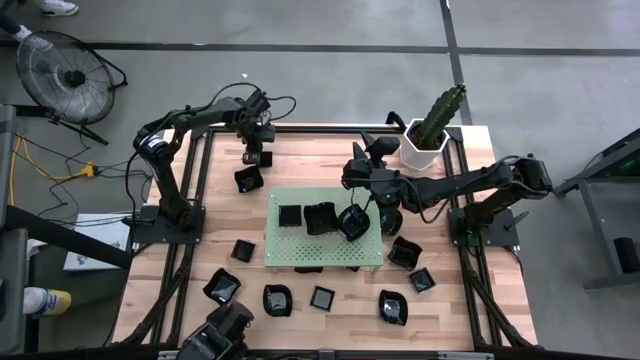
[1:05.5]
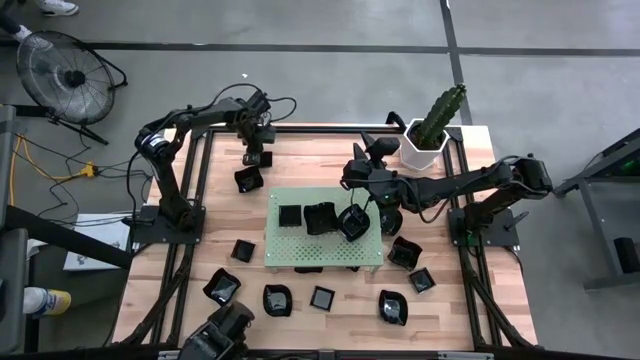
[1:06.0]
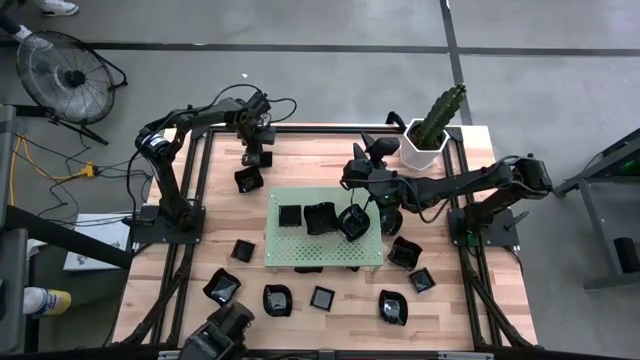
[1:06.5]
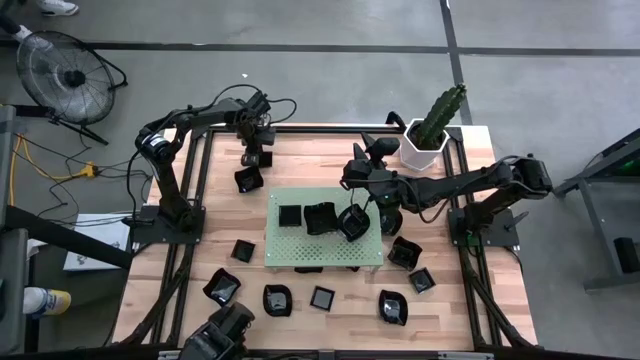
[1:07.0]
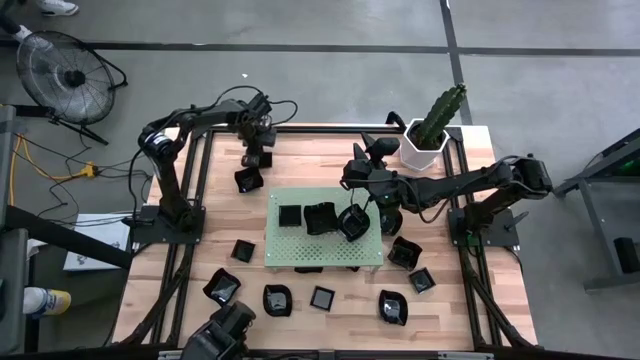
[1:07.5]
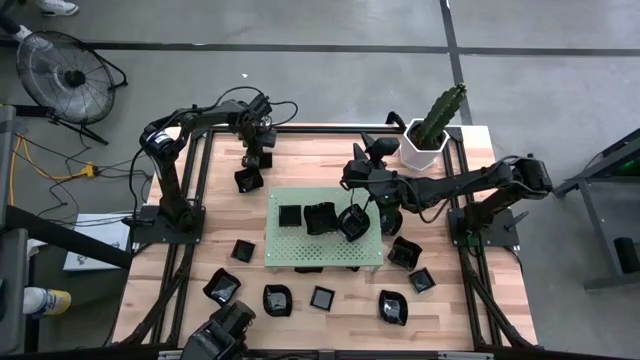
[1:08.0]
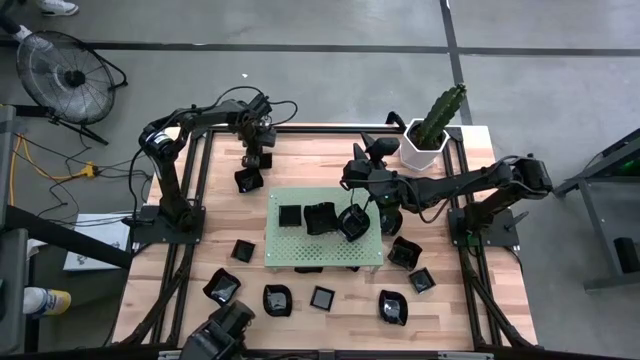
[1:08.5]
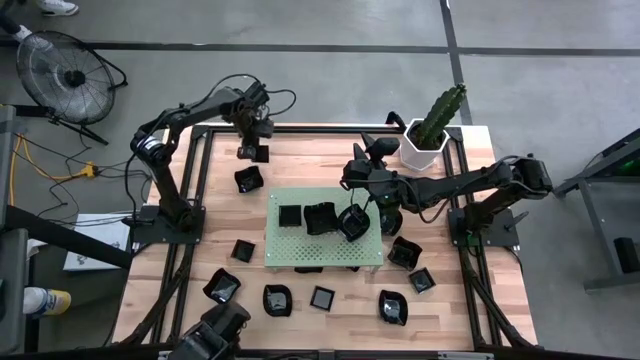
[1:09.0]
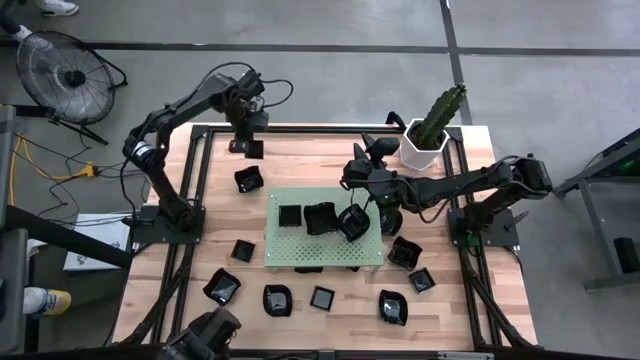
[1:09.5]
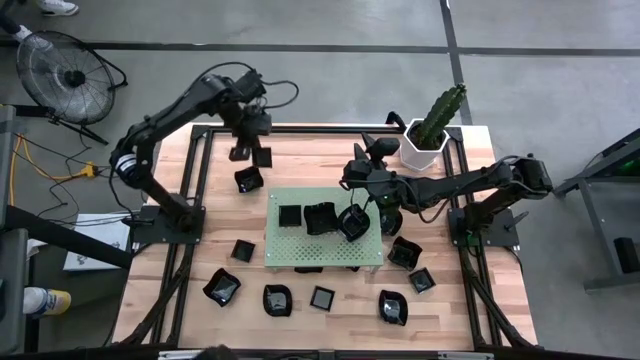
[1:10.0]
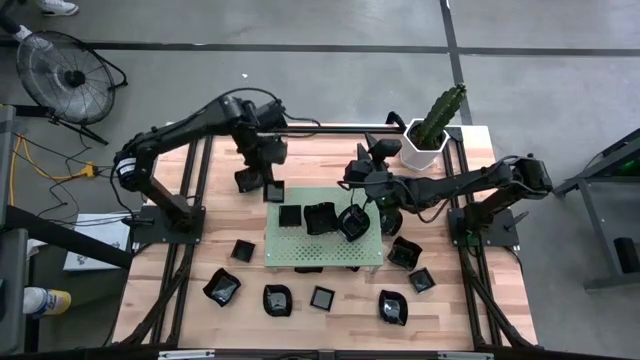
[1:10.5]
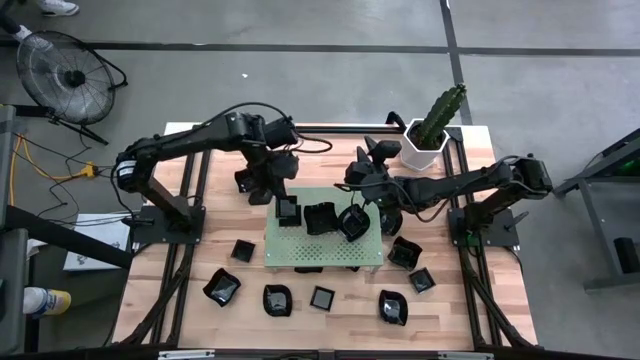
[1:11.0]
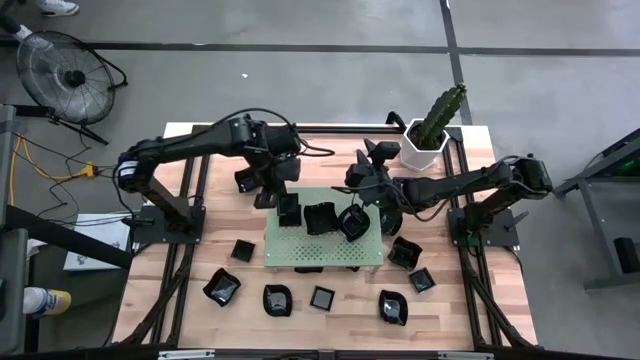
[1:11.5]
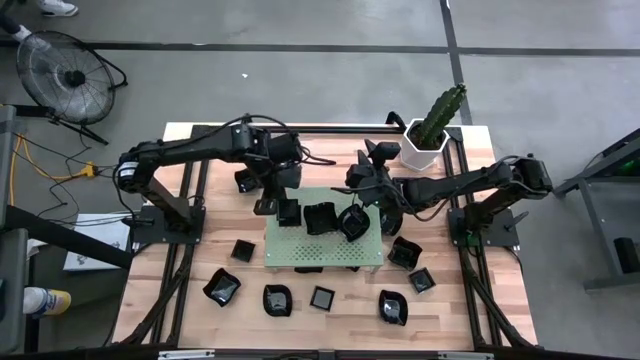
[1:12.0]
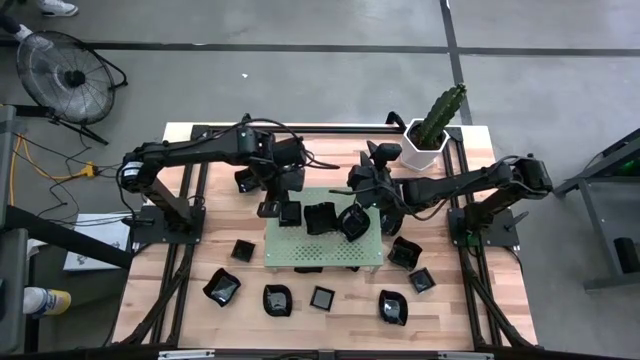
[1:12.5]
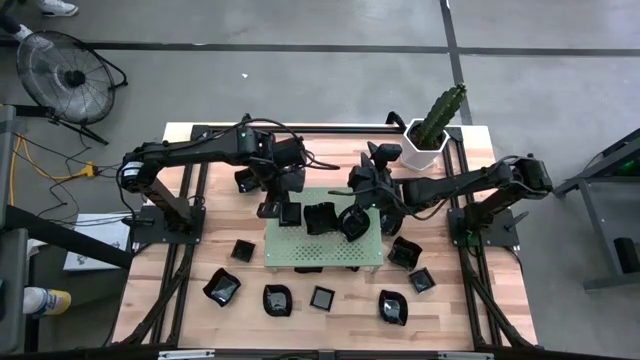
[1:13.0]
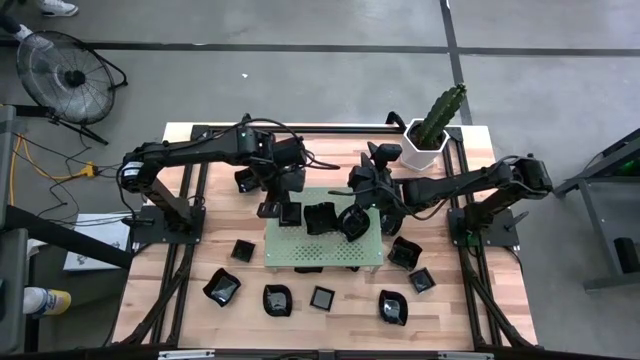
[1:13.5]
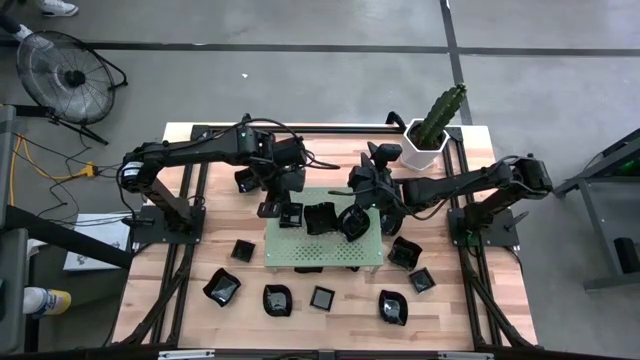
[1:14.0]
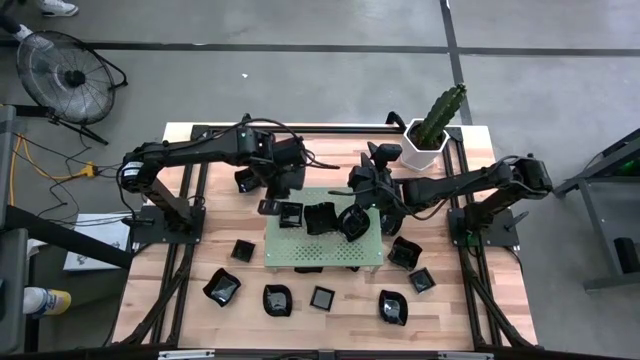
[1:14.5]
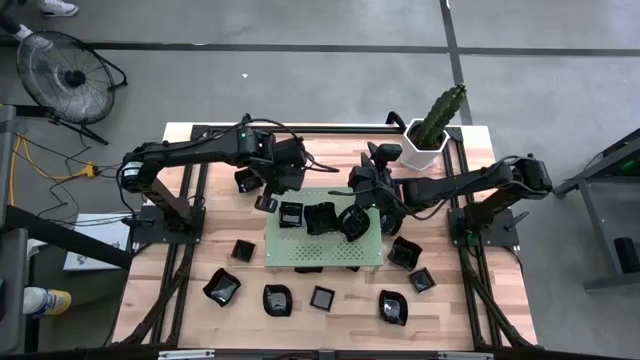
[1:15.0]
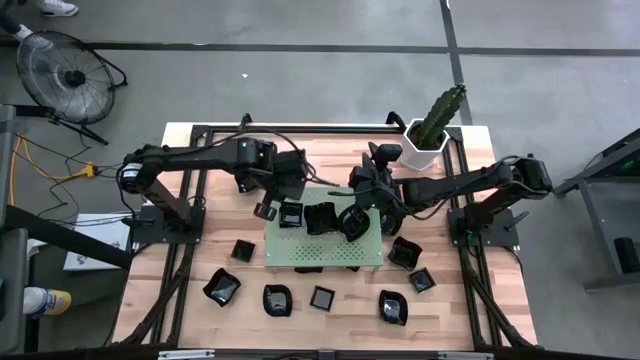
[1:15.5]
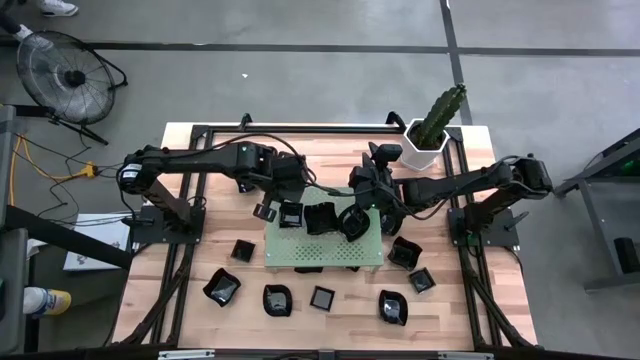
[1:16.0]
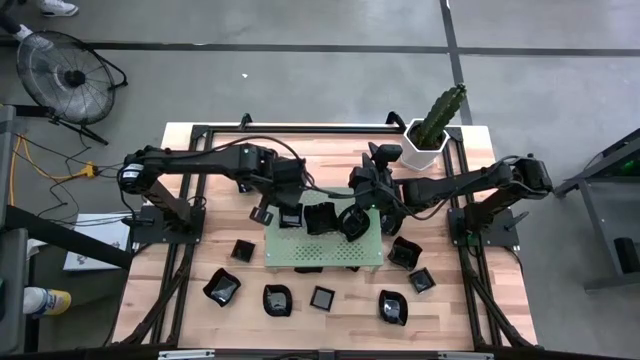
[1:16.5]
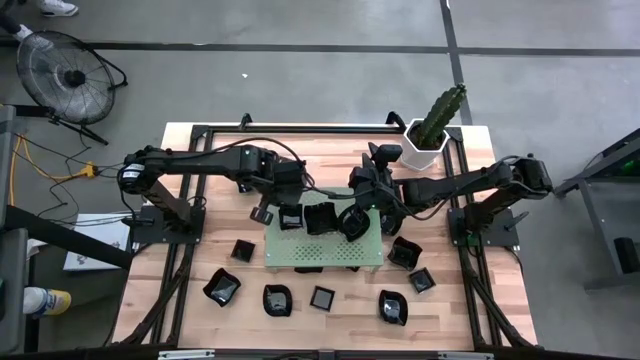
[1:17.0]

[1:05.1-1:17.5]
Task: Pick & Place Mini shaped plates
Stack the black square shaped plate on top of the black square shaped plate on the shelf

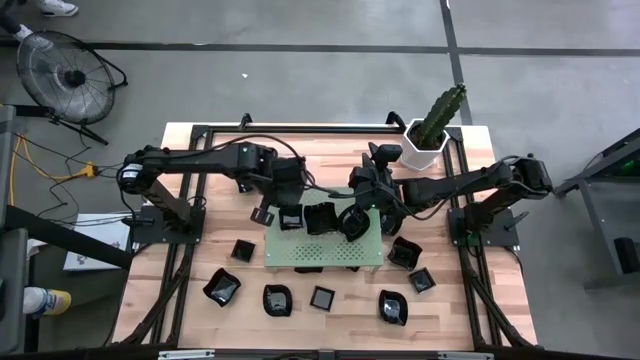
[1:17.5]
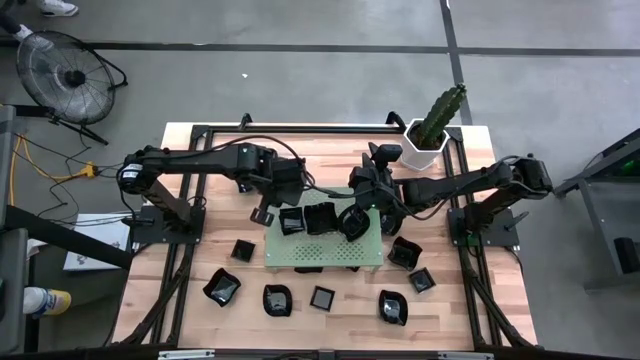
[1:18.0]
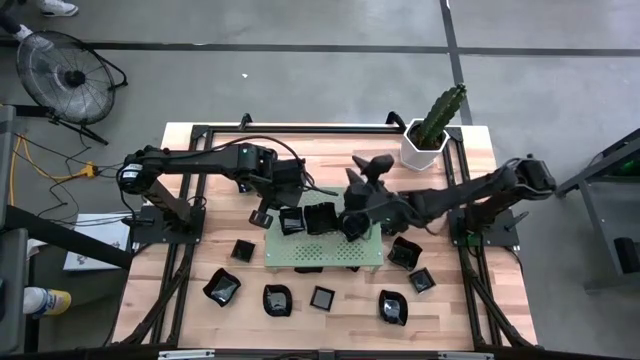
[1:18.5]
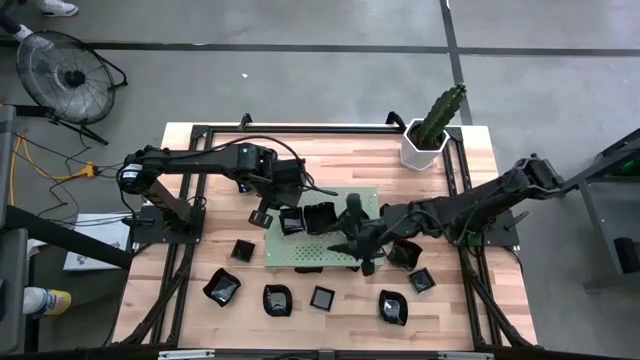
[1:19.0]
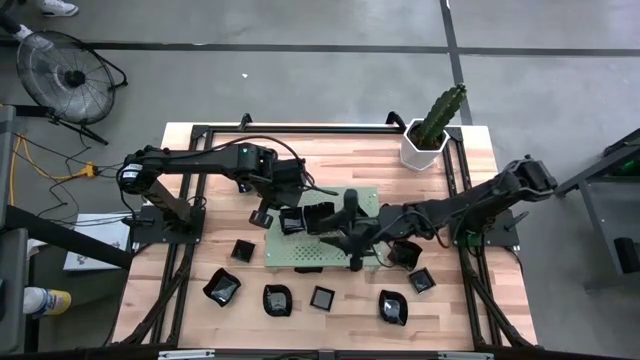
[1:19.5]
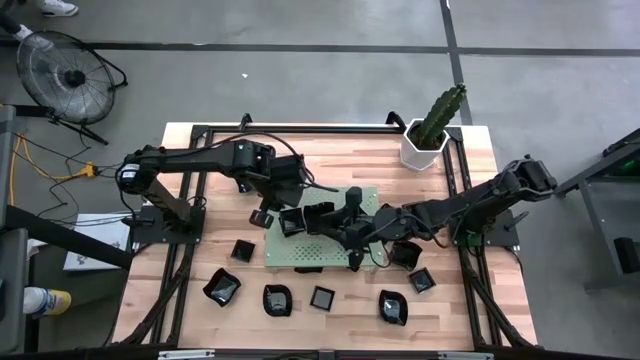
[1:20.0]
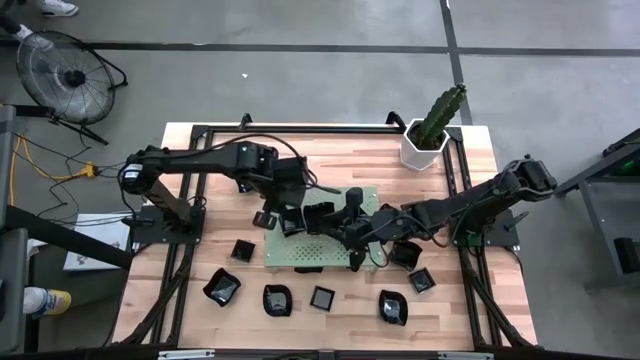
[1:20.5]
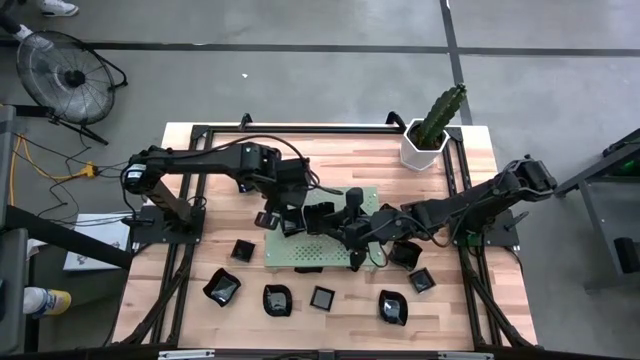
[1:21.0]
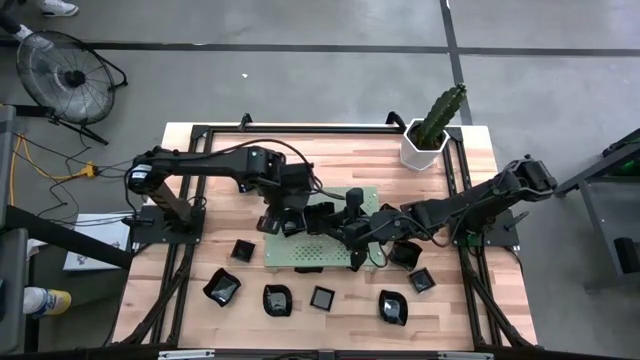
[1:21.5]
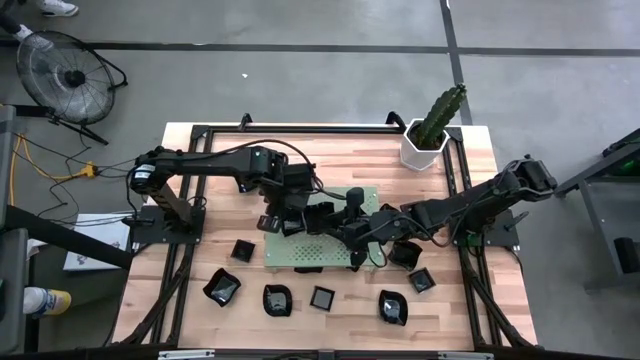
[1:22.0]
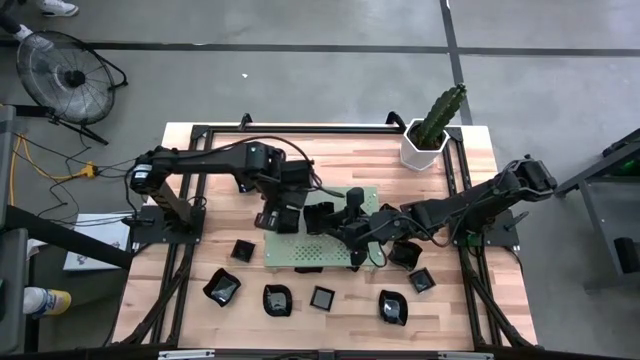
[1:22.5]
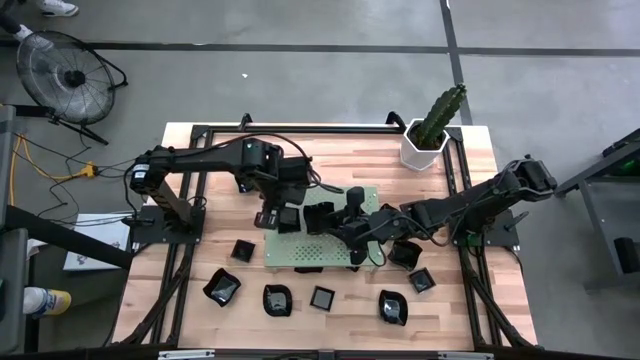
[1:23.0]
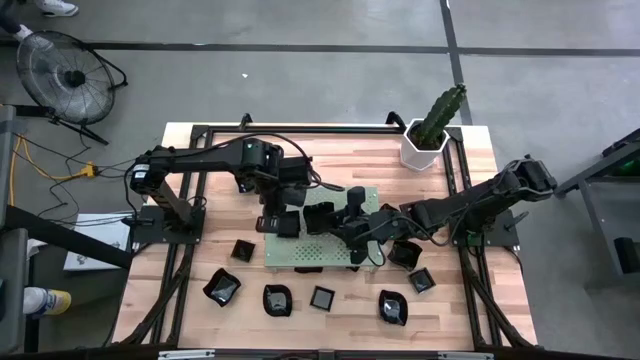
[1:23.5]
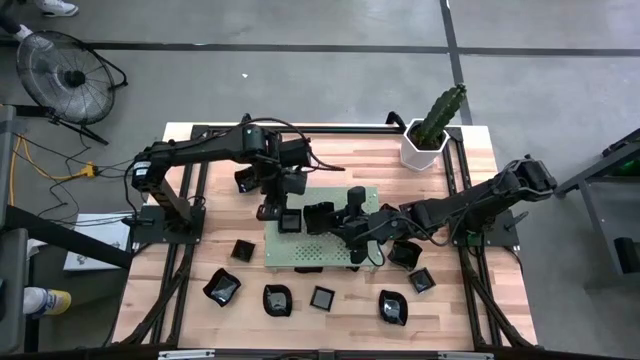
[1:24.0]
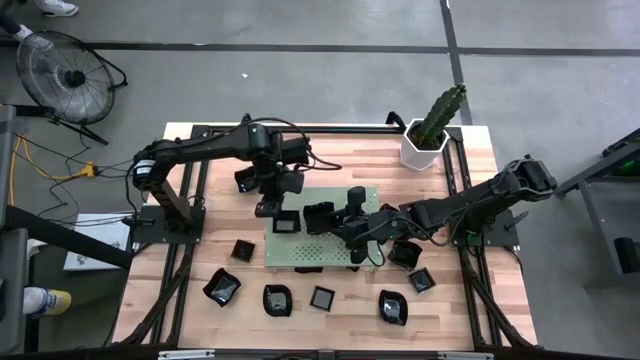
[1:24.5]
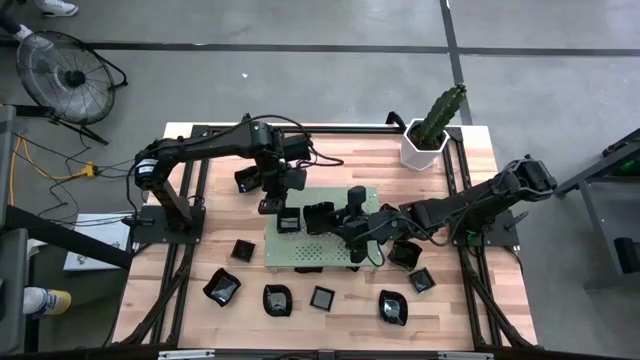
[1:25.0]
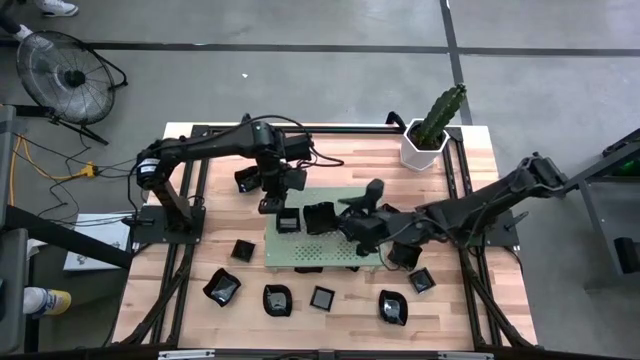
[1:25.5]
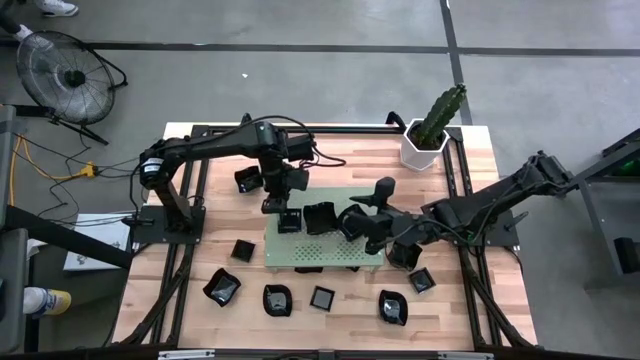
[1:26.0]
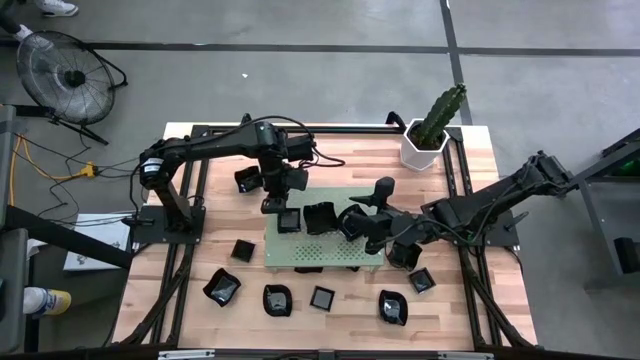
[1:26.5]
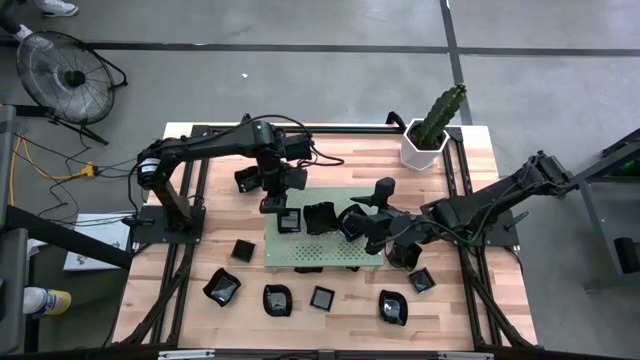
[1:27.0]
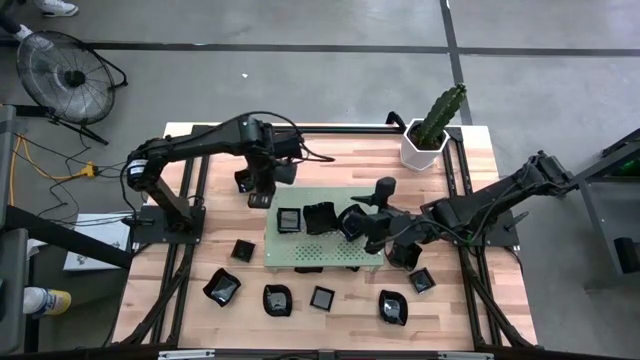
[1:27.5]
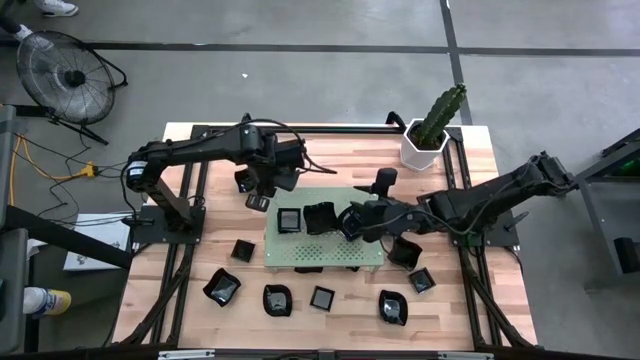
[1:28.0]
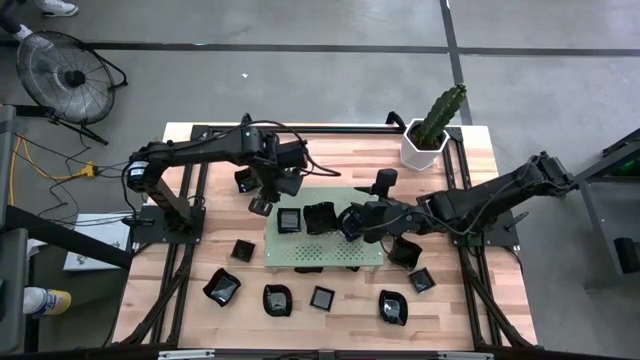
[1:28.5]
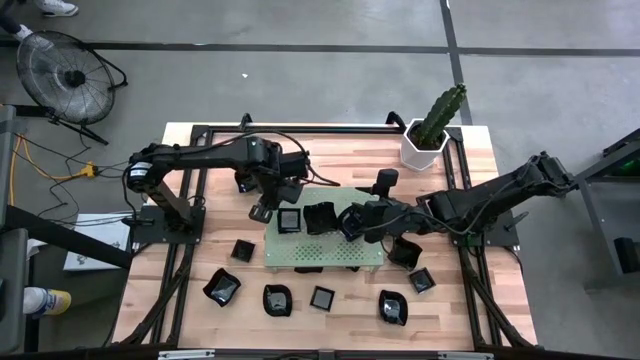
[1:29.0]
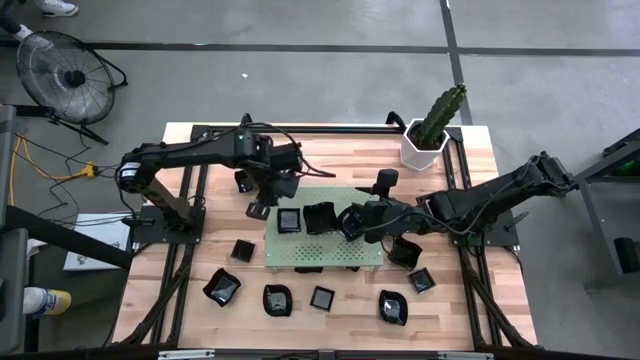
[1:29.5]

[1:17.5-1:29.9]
Stack the black square shaped plate on top of the black square shaped plate on the shelf
